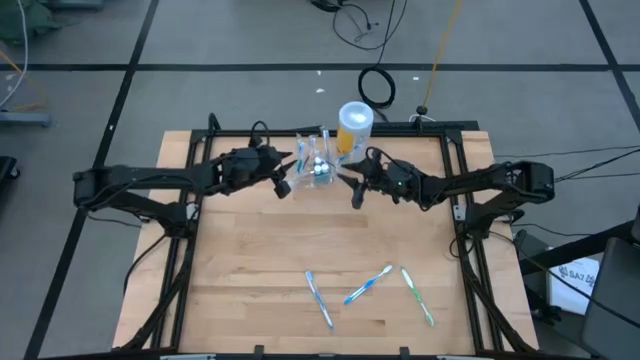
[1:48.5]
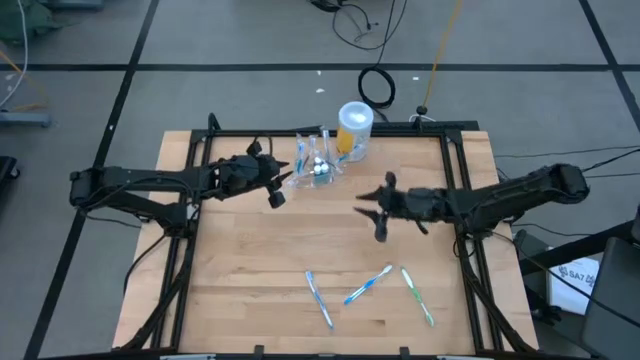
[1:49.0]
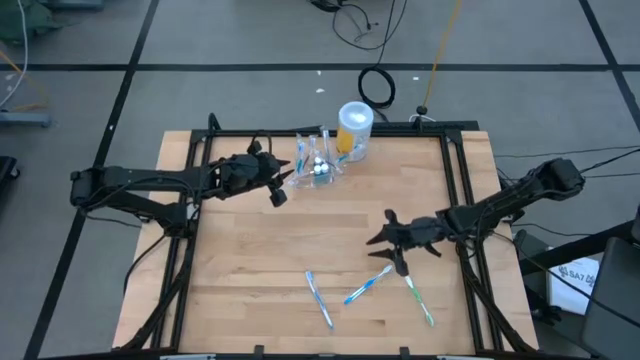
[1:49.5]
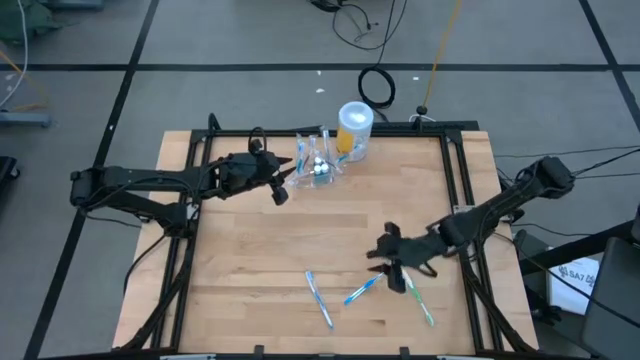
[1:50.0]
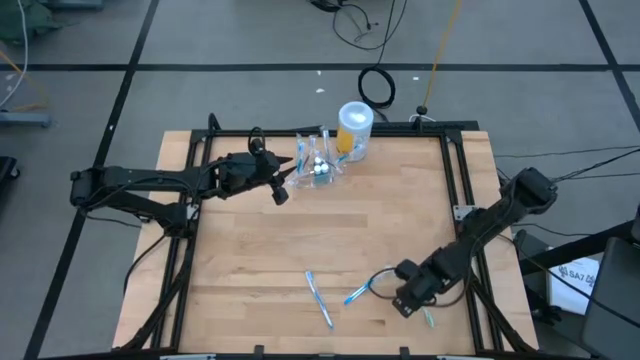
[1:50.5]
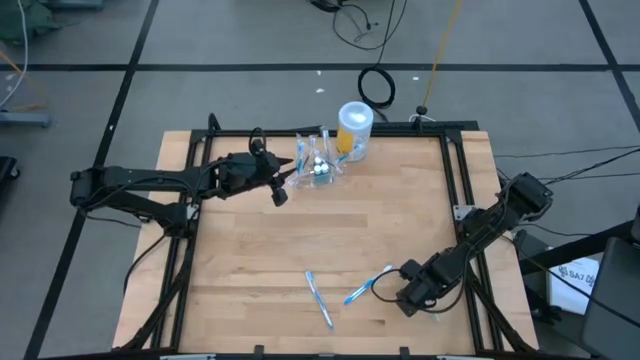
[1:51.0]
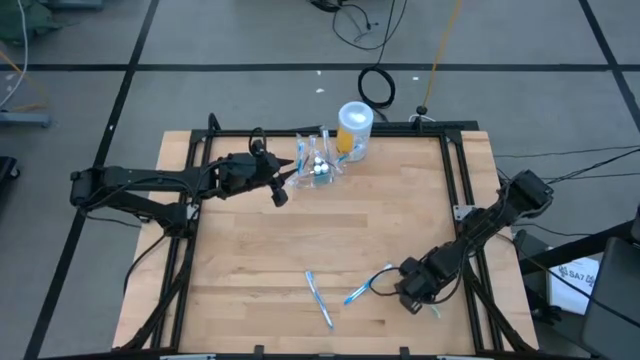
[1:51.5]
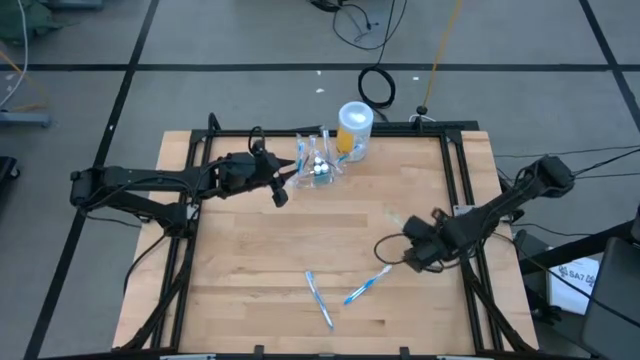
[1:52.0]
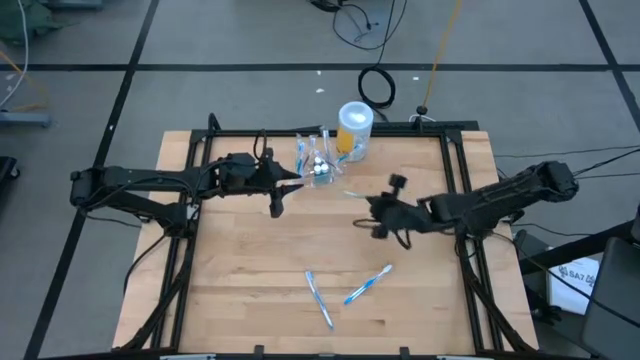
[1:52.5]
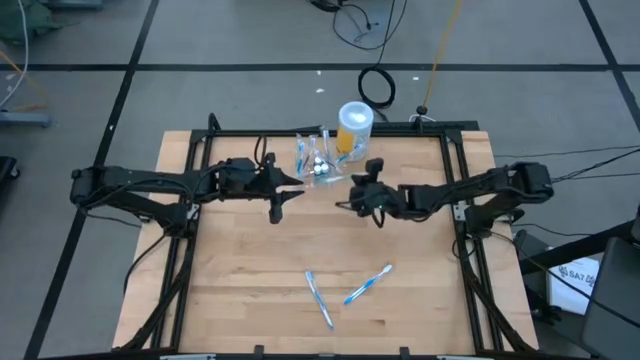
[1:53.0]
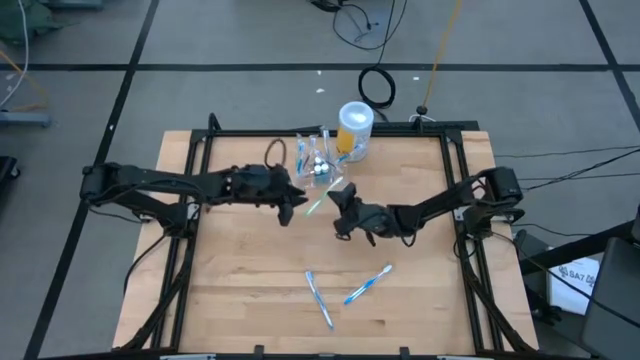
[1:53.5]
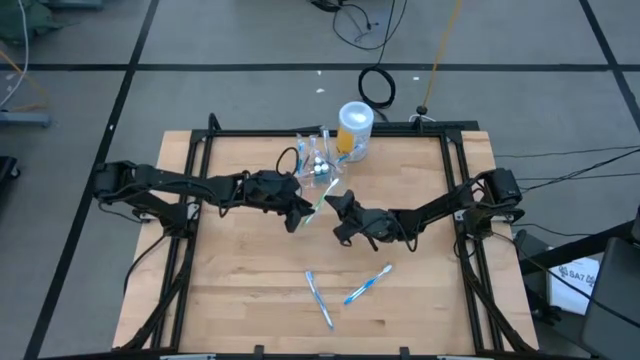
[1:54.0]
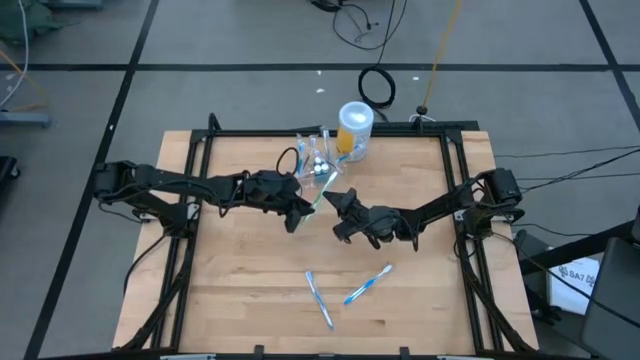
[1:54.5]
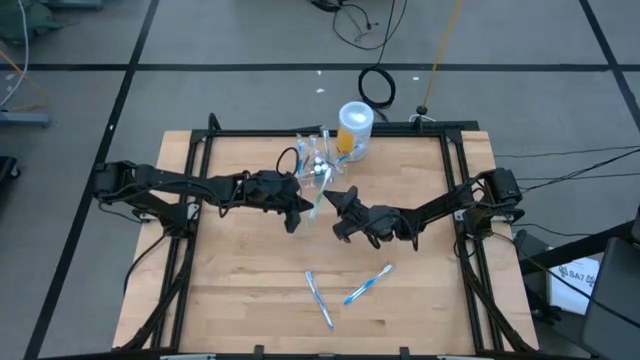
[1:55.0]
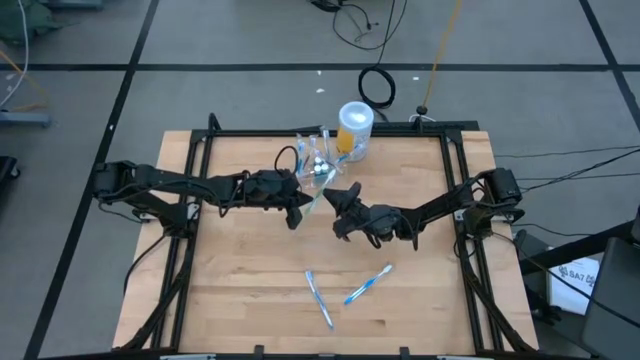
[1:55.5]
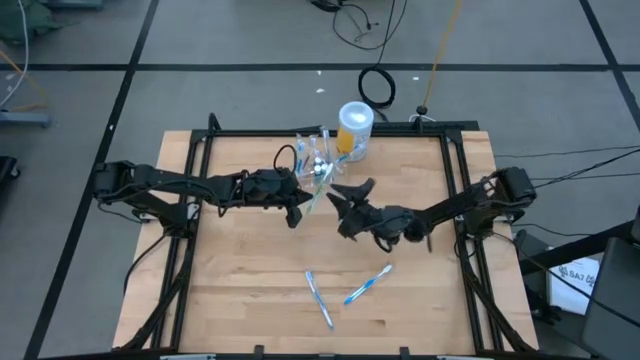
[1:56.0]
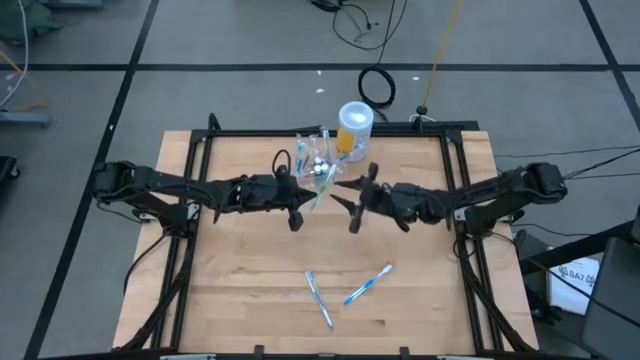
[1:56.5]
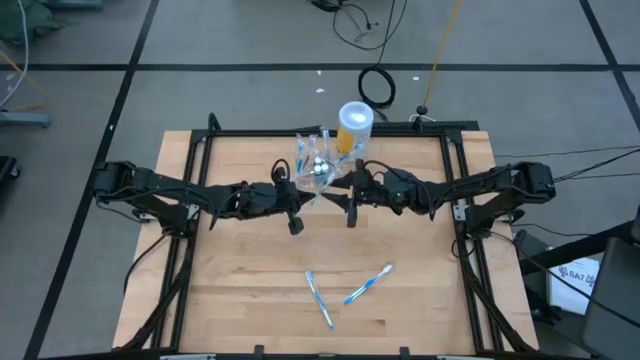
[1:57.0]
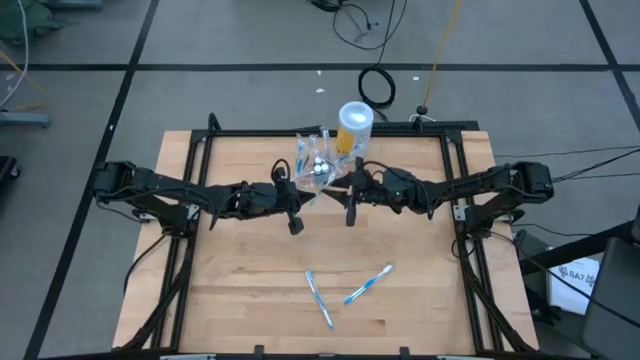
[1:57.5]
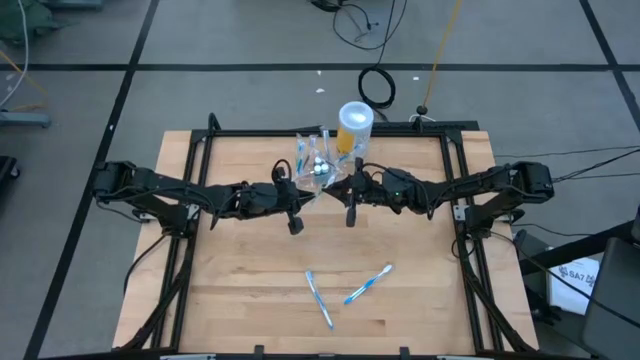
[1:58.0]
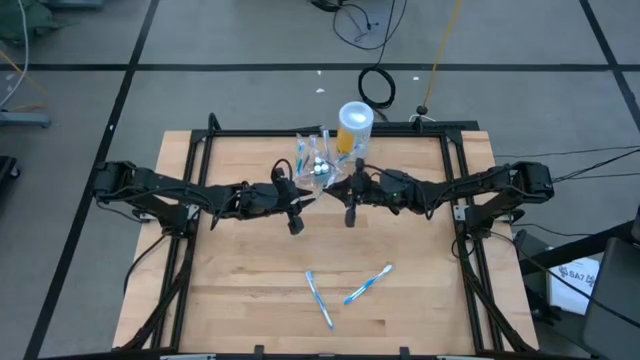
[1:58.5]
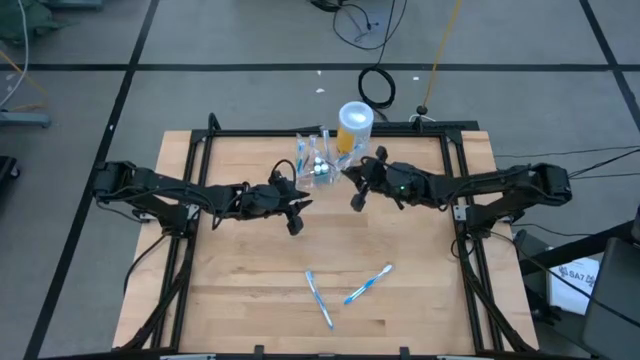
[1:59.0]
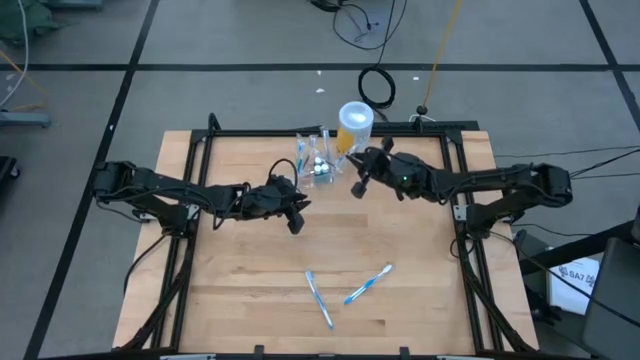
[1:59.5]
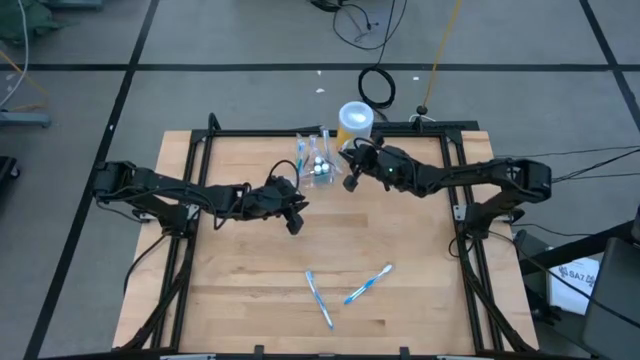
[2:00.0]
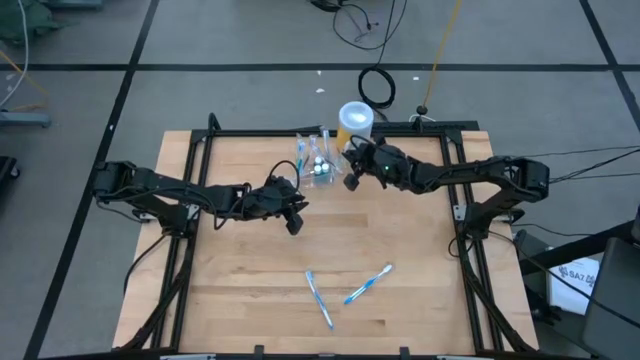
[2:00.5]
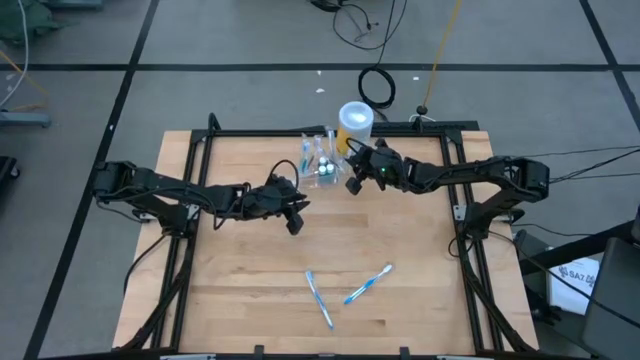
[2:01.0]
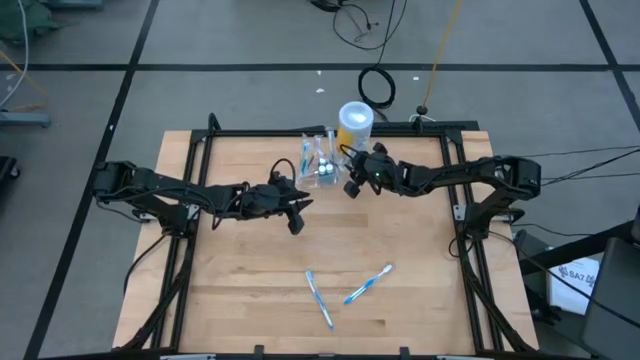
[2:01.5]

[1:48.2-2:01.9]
Task: Pick & Place toothbrushing station
Put the green toothbrush into the right section of the transparent organizer

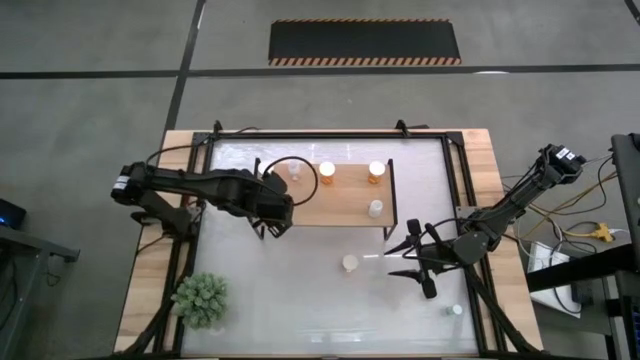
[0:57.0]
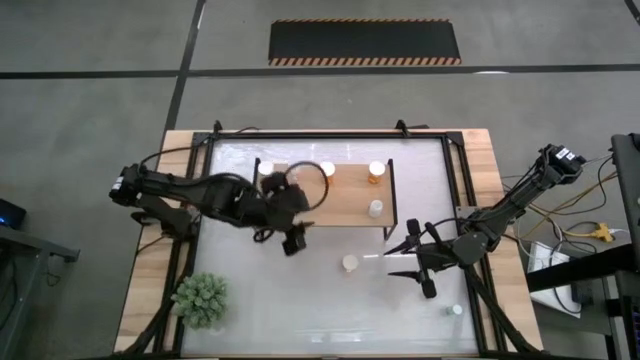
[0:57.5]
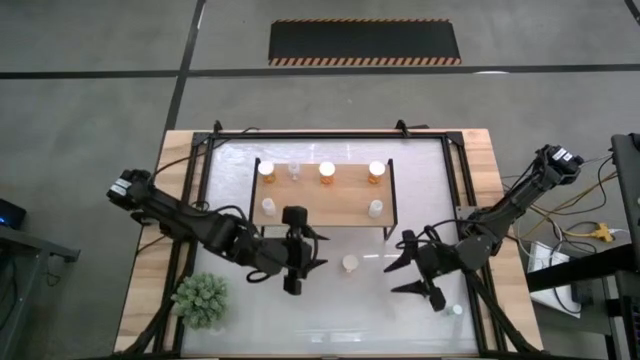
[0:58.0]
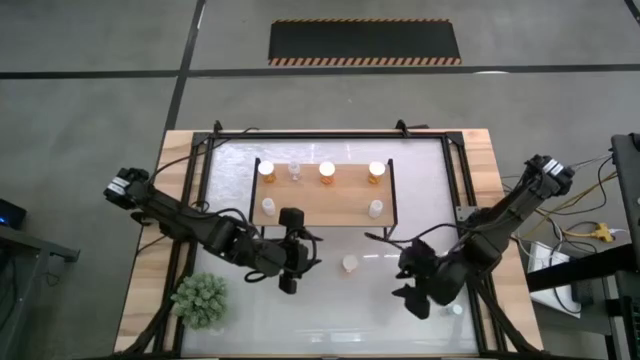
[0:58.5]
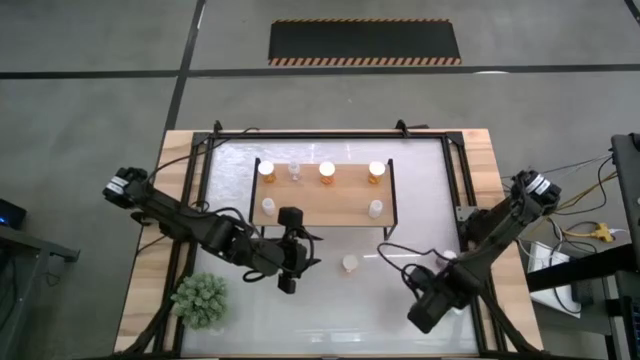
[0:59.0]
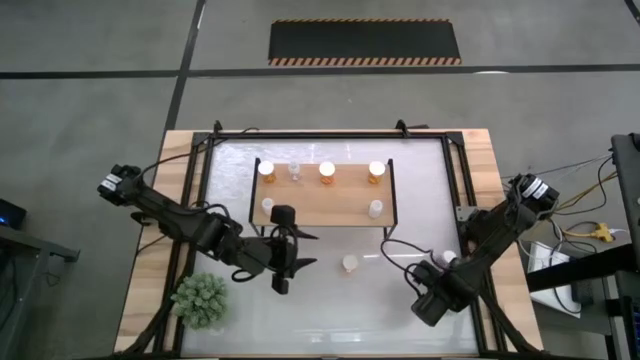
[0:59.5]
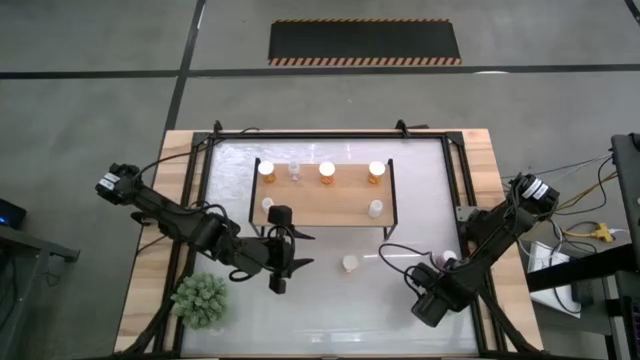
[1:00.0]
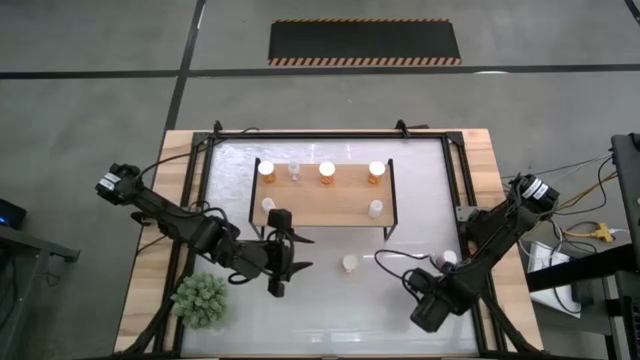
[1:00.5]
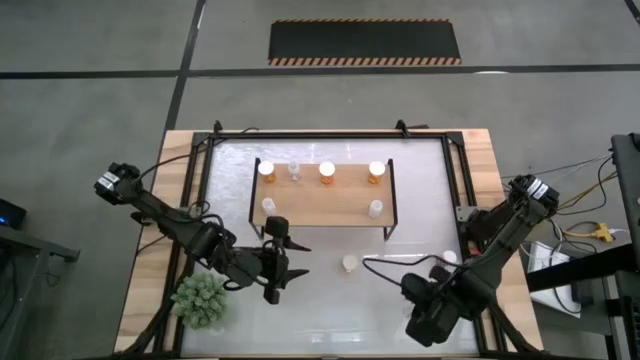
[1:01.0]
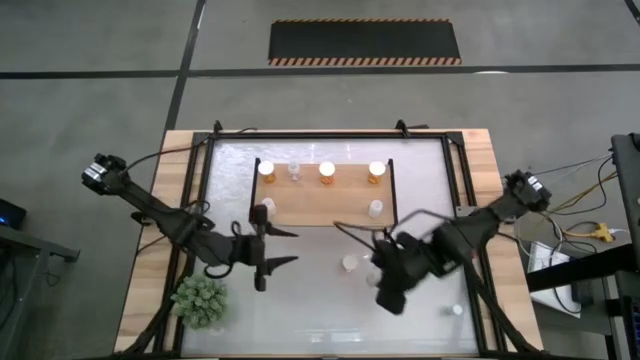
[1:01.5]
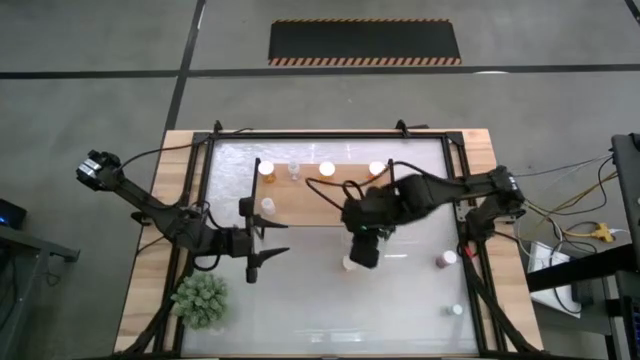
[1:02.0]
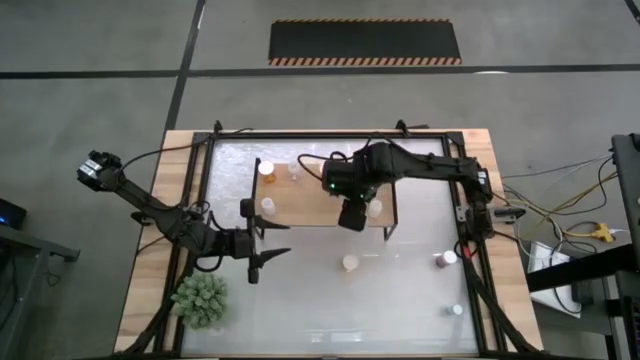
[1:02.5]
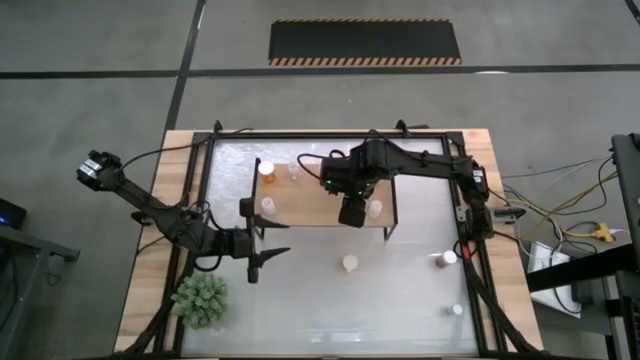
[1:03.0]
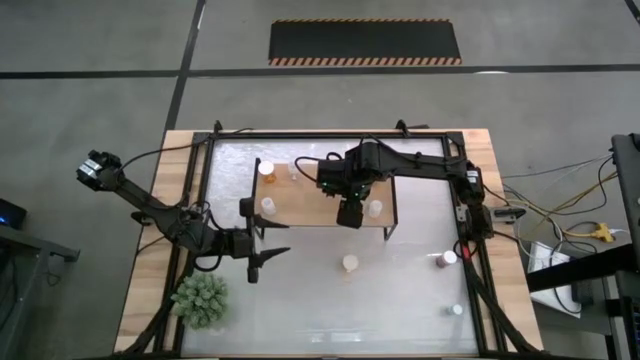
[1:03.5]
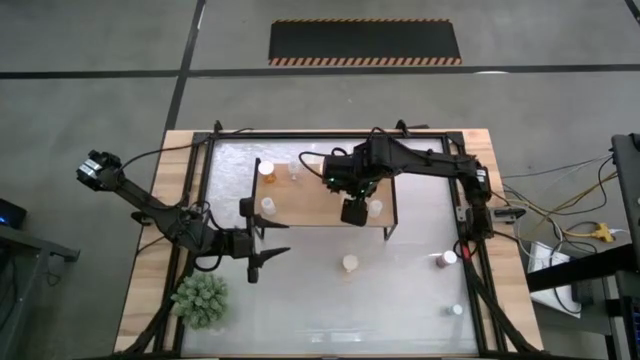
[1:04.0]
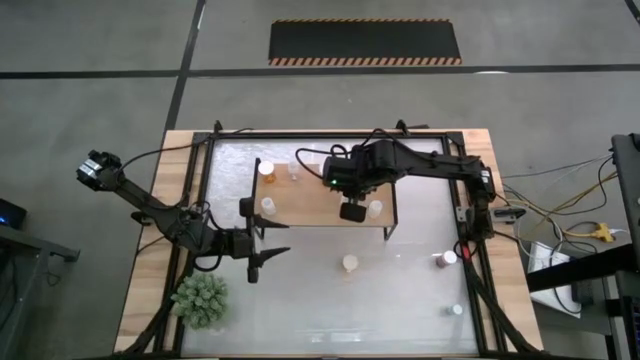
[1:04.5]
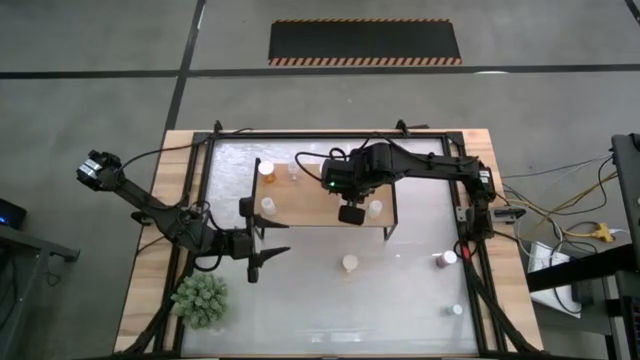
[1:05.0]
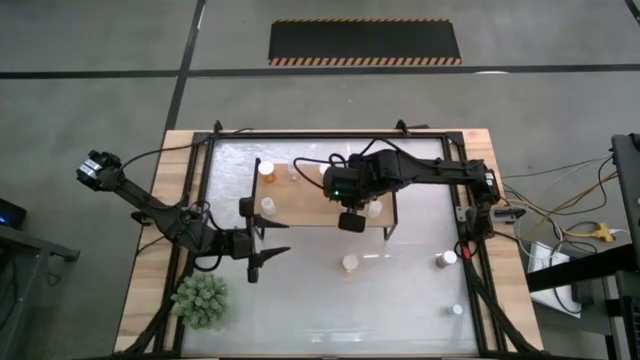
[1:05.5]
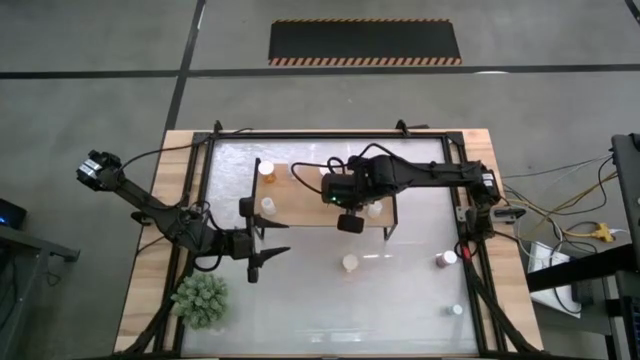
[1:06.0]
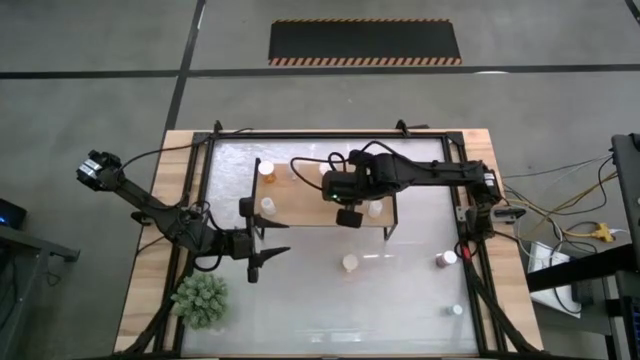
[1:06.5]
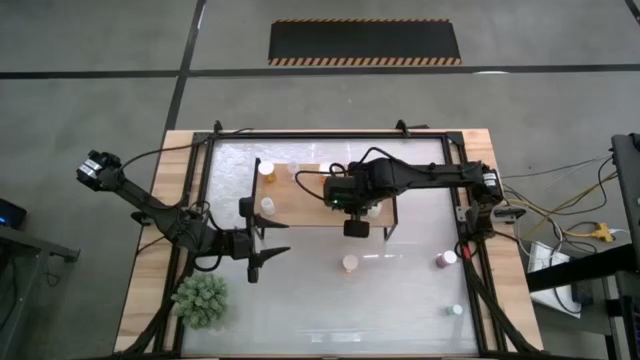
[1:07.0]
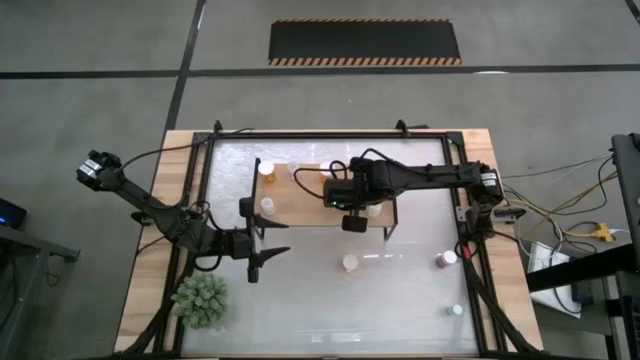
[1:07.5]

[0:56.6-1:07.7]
Task: Pick and place medicine bottles onto shelf by color
Put the transparent pill bottle on the shelf
